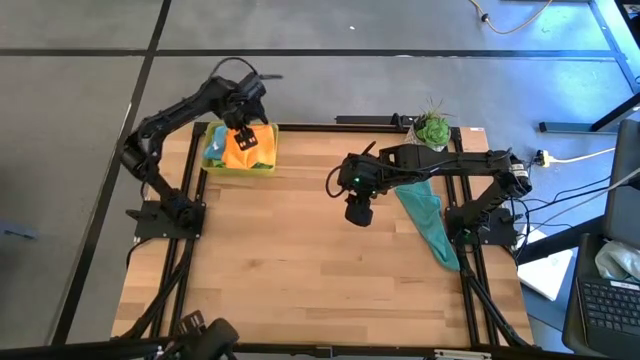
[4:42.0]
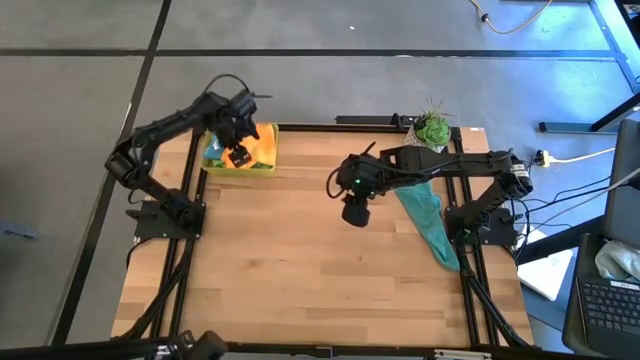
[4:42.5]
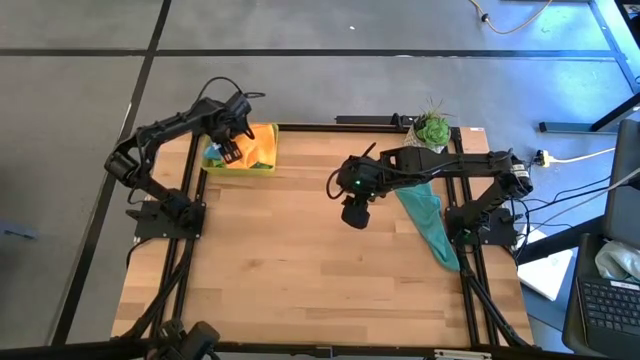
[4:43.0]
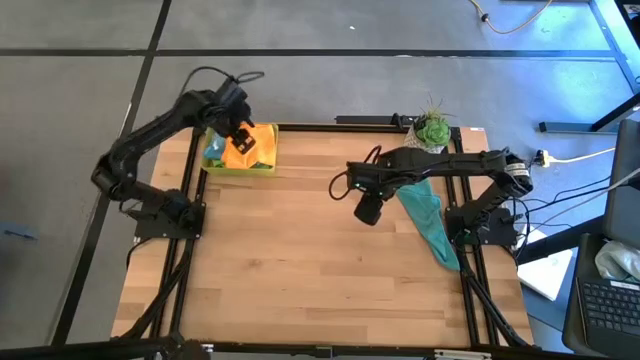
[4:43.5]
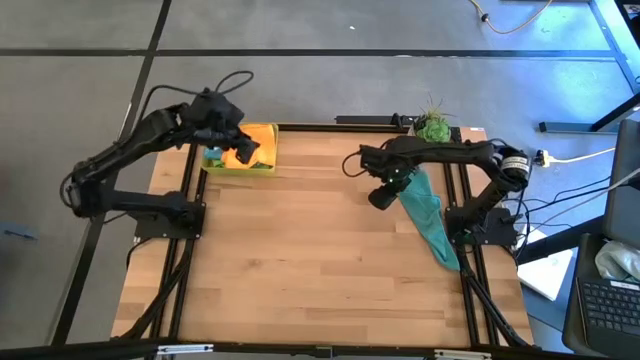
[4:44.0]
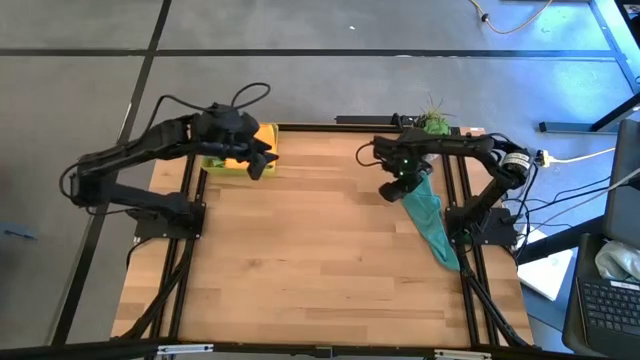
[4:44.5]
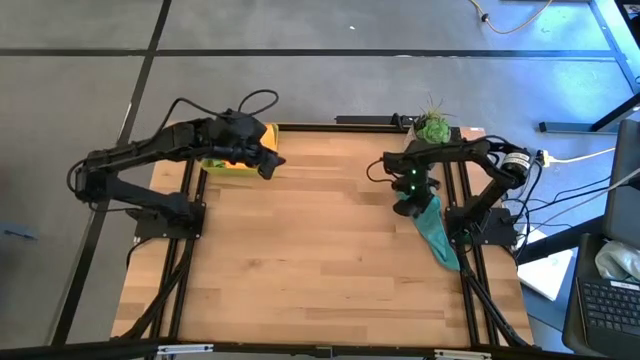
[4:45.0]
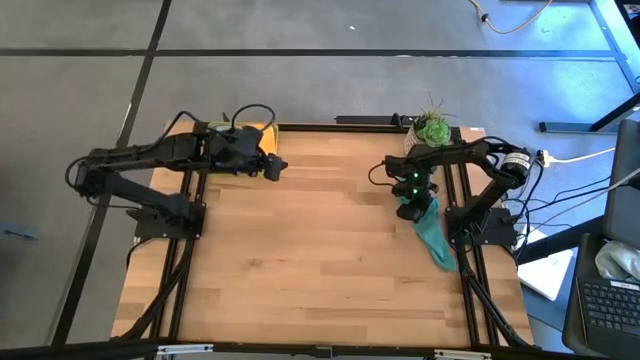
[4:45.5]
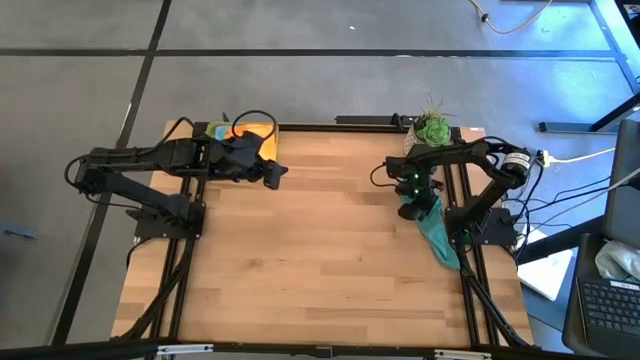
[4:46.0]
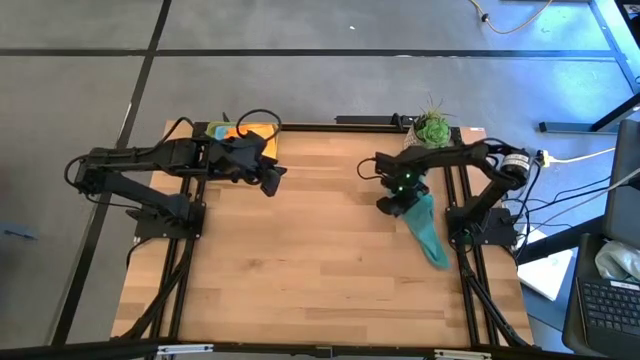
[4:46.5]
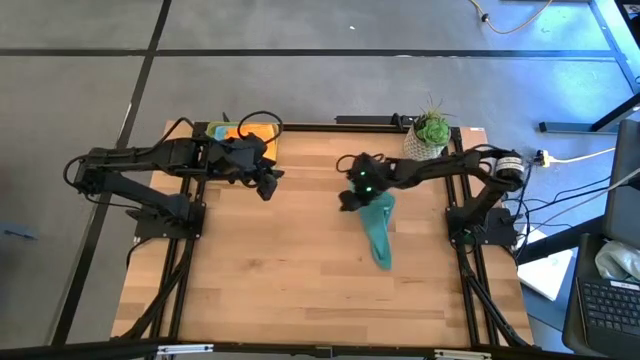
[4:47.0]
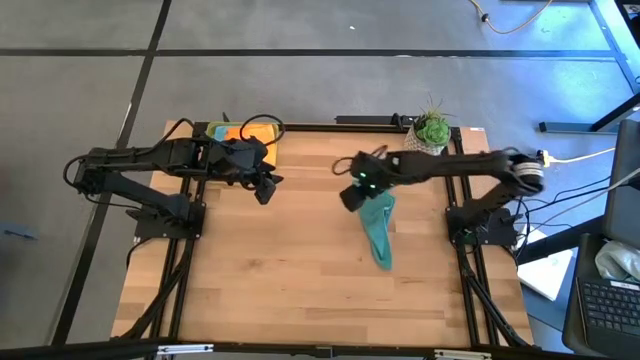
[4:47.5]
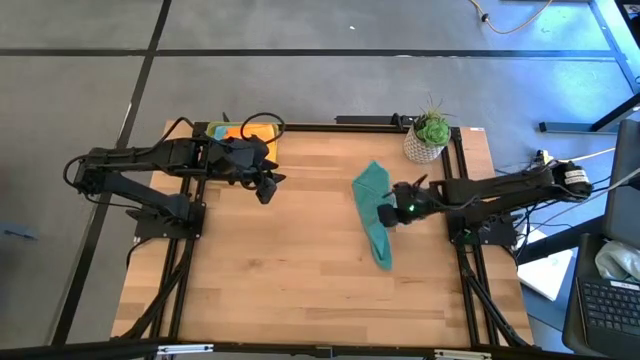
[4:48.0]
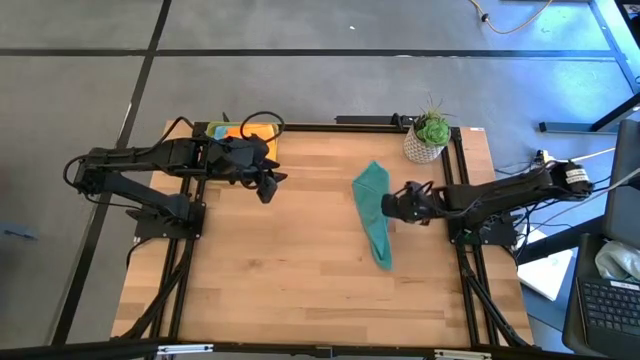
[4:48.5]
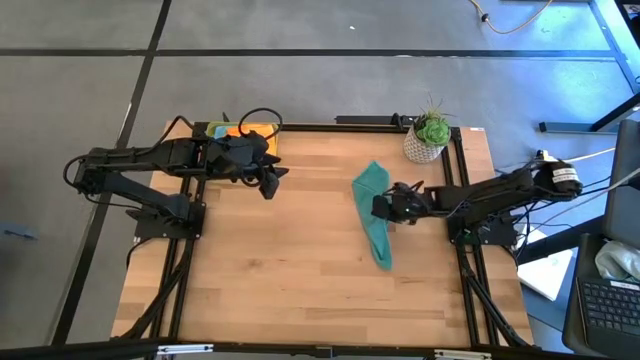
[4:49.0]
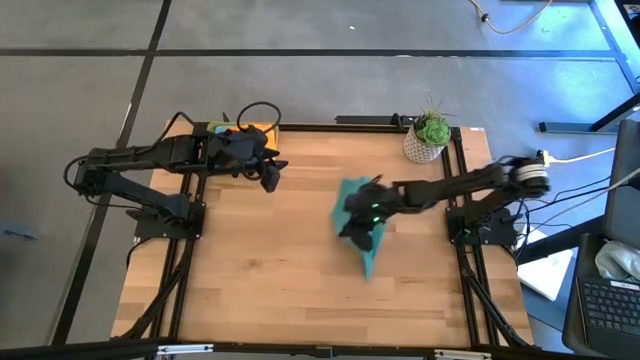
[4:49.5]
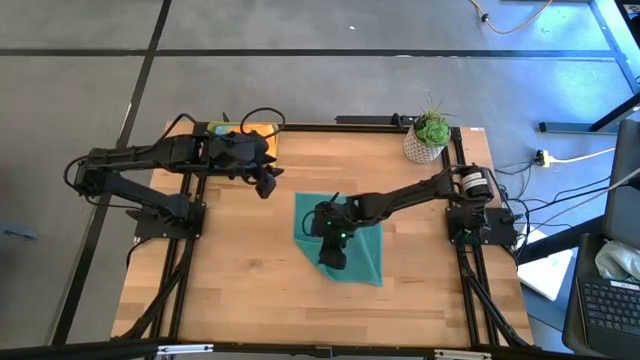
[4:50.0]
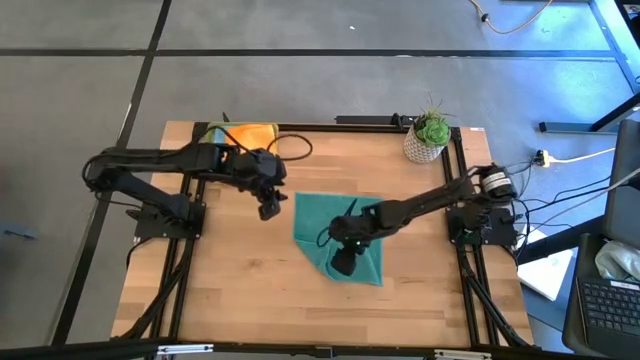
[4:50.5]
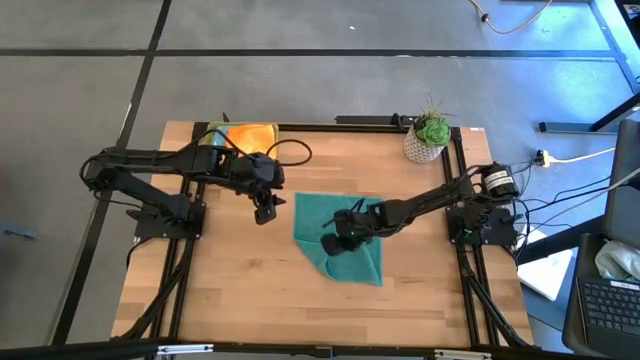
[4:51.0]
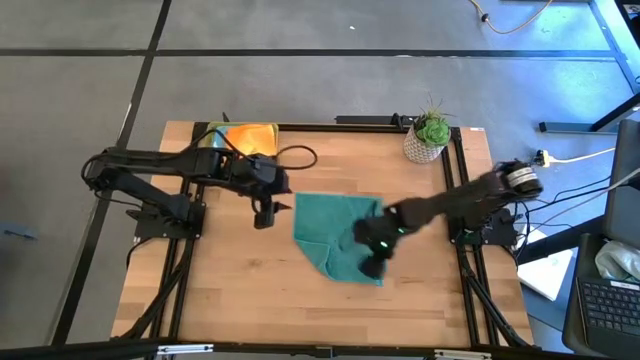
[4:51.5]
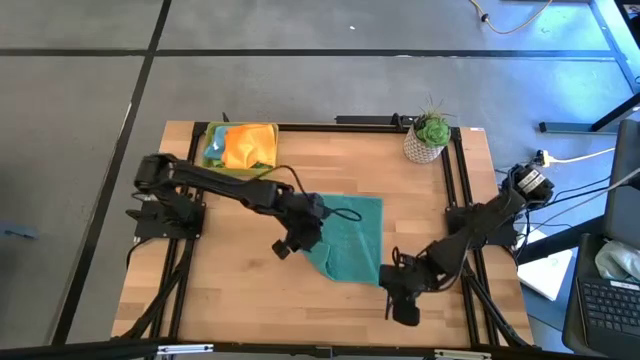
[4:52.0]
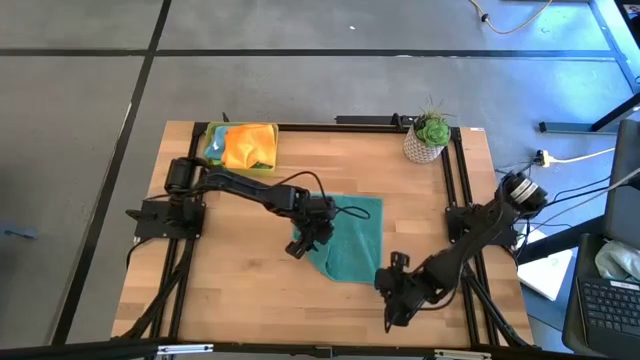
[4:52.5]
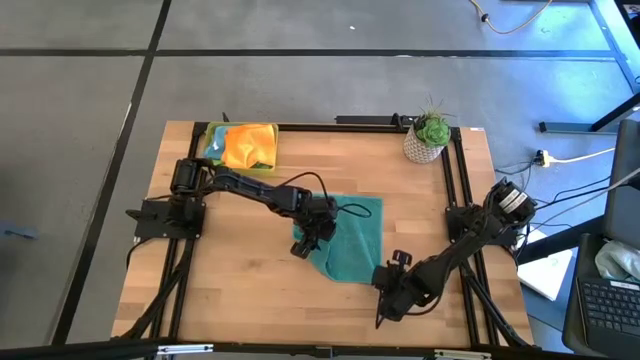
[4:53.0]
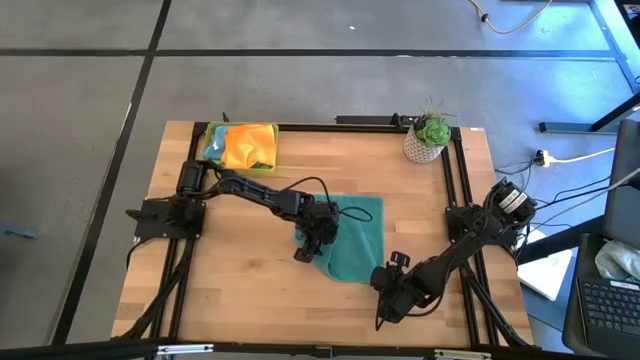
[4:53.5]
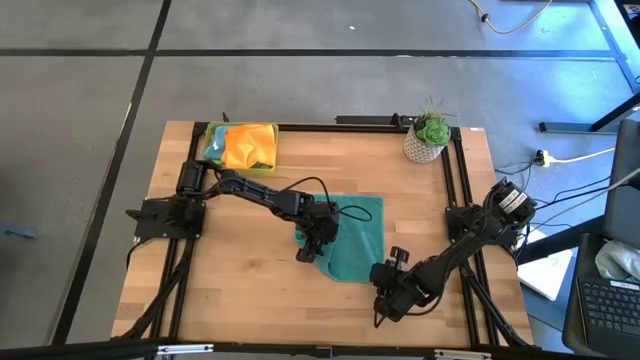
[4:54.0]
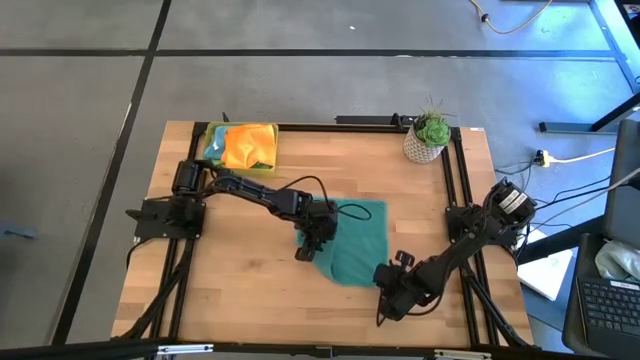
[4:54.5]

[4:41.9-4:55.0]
Task: Fold microfiber towels
Fold the blue towel

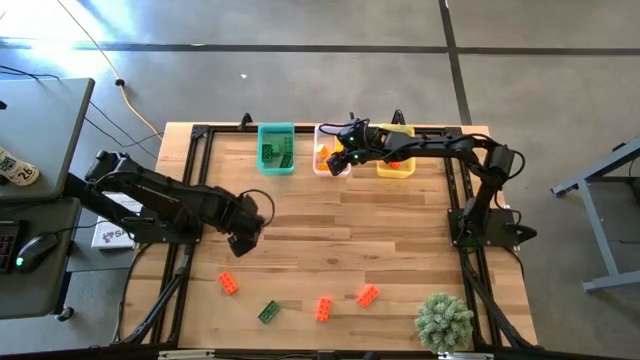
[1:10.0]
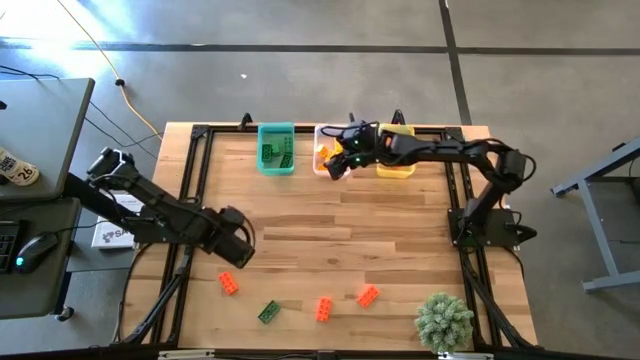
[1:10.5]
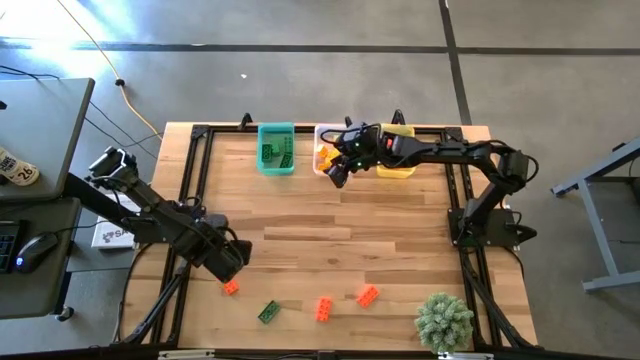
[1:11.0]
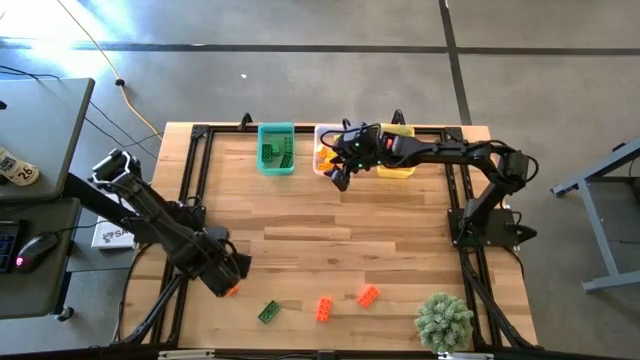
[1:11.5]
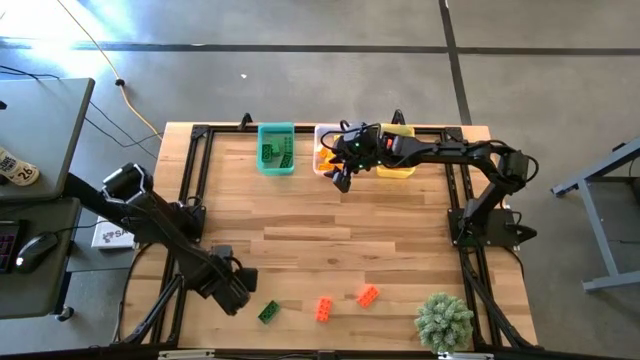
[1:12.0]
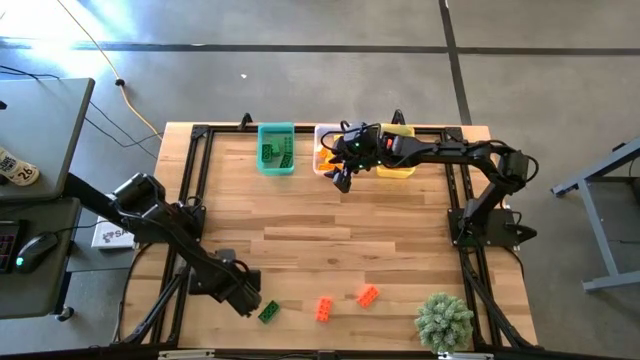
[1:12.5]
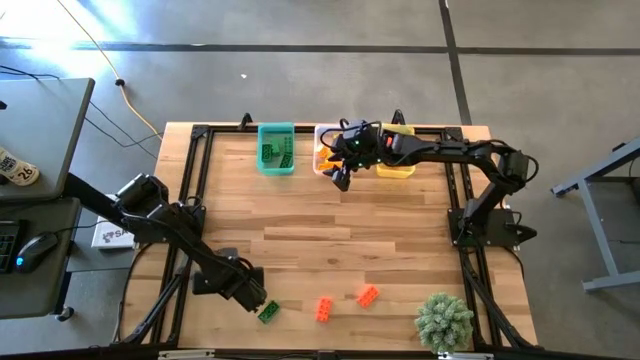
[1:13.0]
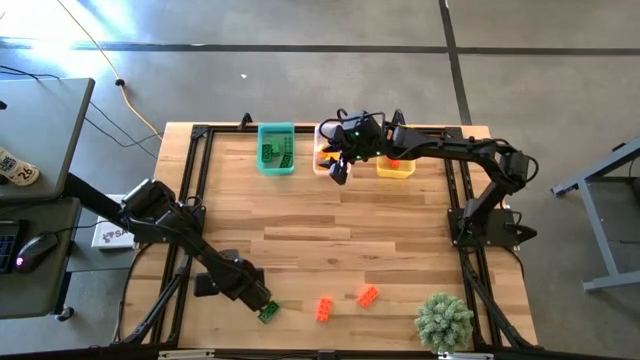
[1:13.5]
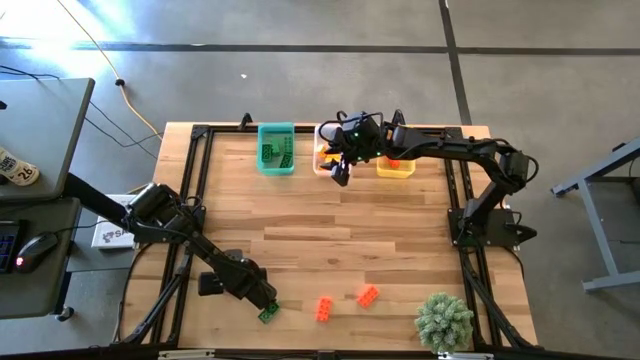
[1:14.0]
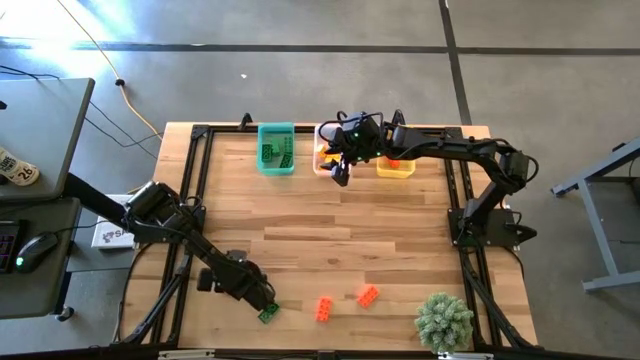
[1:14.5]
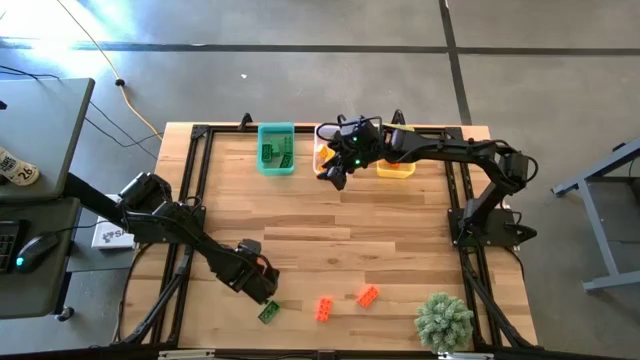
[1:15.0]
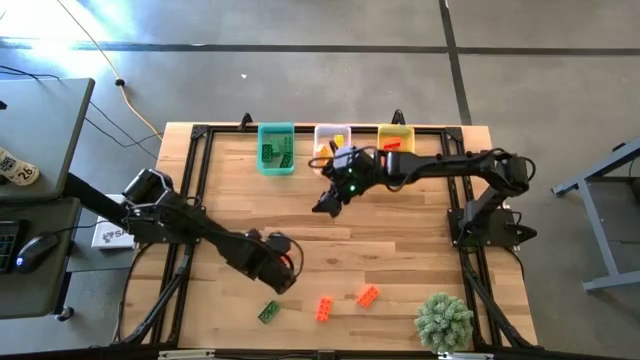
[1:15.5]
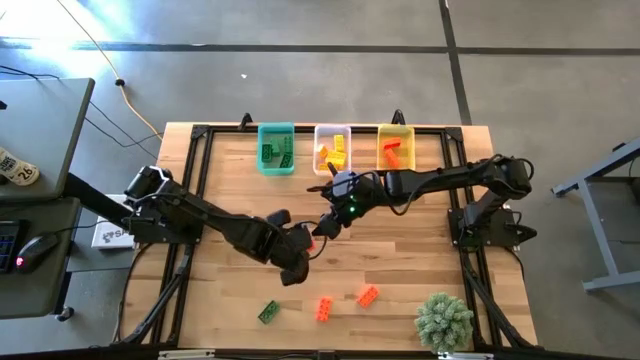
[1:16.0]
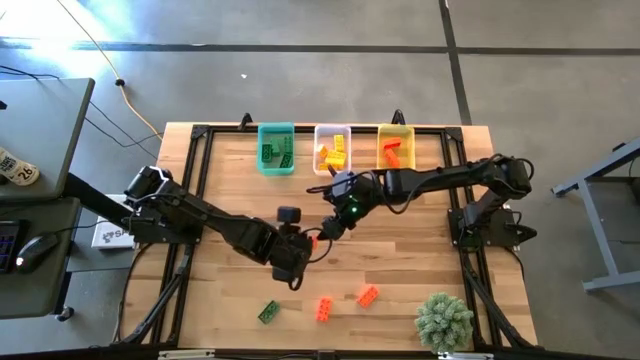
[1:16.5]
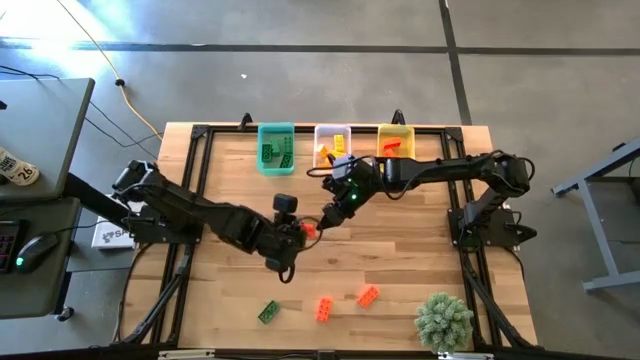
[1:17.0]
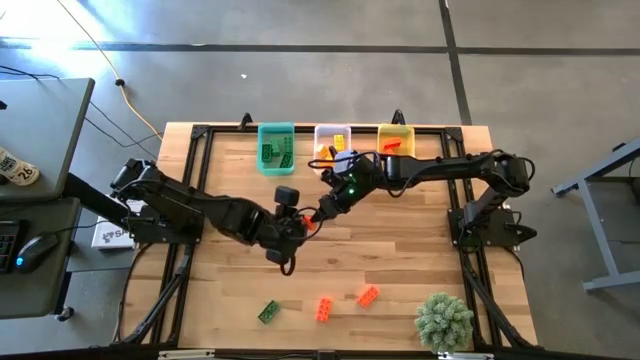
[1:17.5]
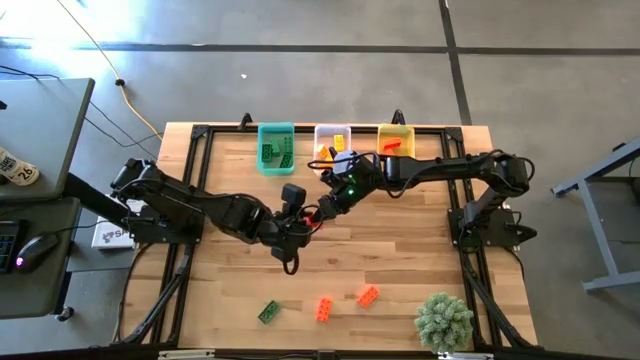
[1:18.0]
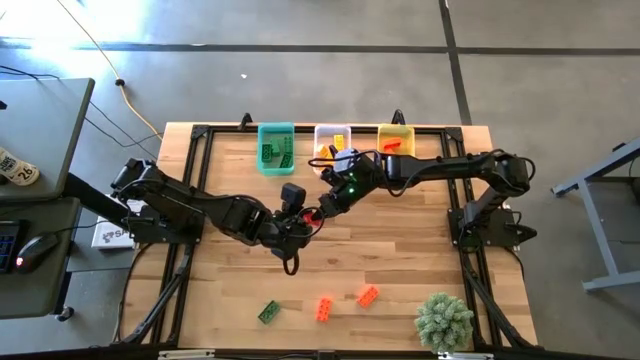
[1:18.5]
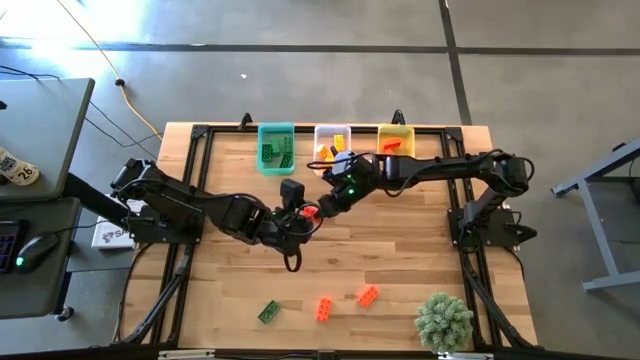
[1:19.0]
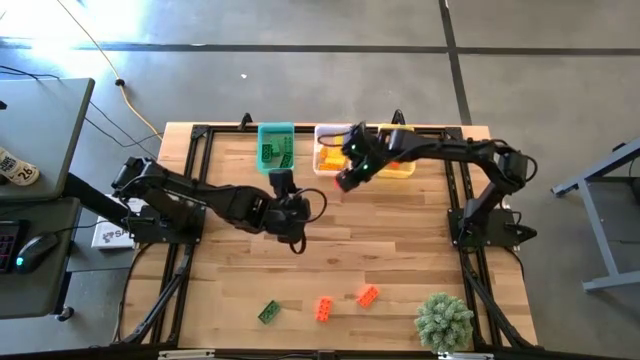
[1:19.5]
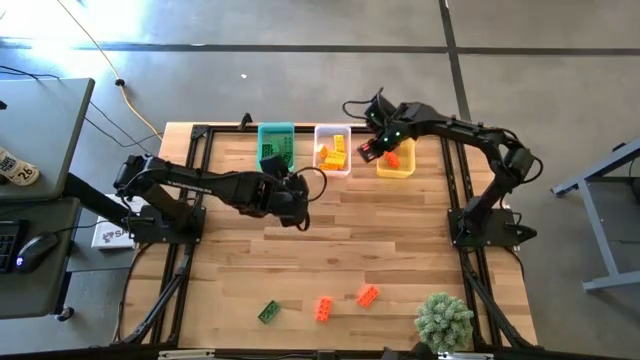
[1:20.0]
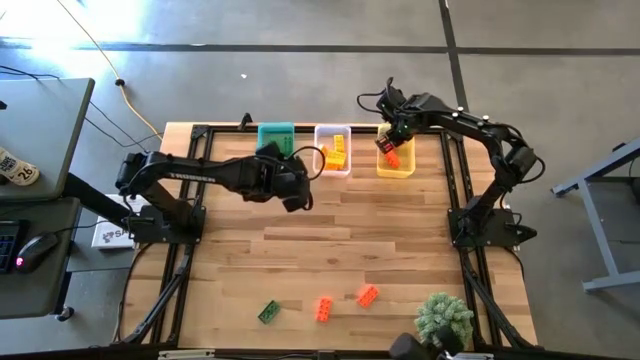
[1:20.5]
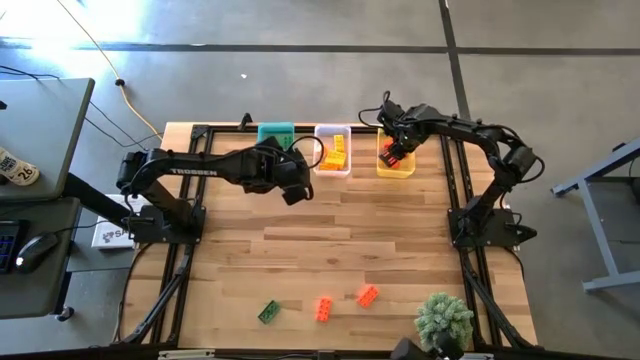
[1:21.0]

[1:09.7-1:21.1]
Task: Sort & place blocks by color
Put the orange game piece into the yellow bin
